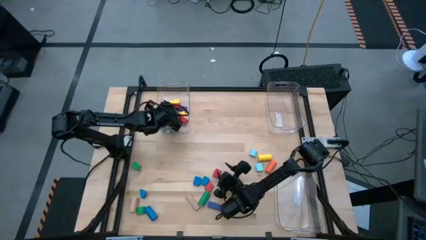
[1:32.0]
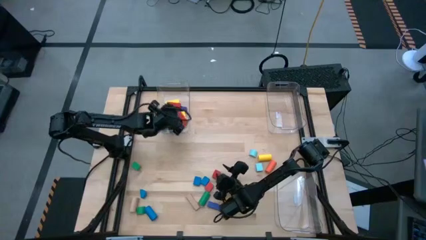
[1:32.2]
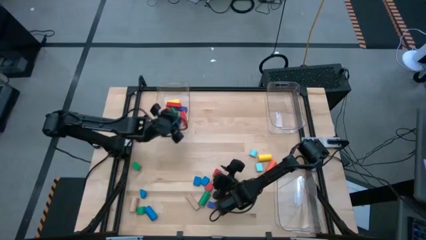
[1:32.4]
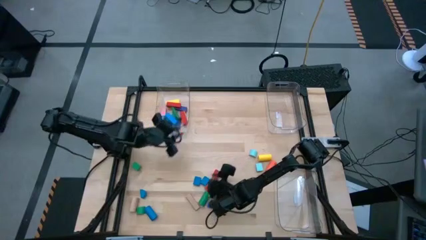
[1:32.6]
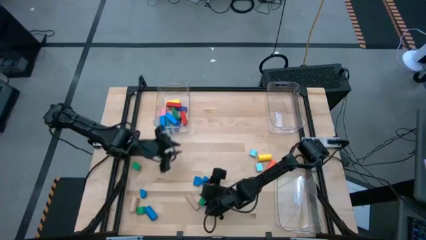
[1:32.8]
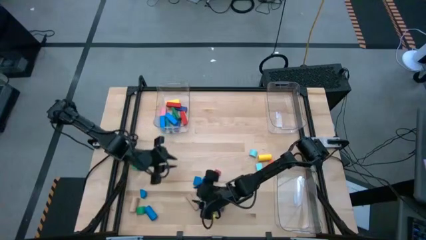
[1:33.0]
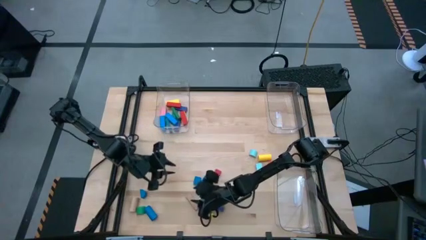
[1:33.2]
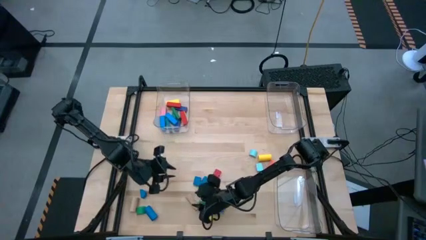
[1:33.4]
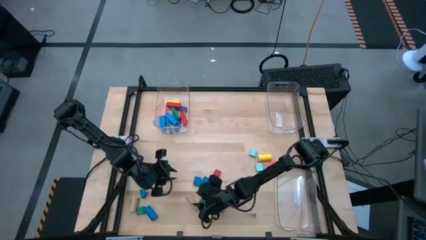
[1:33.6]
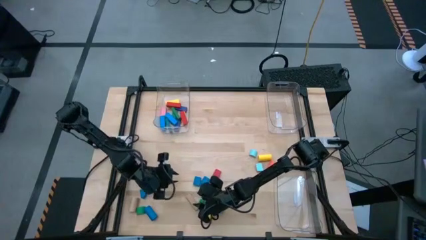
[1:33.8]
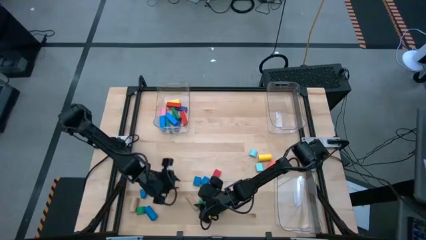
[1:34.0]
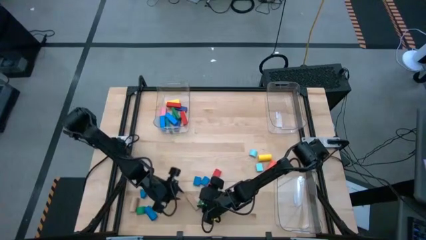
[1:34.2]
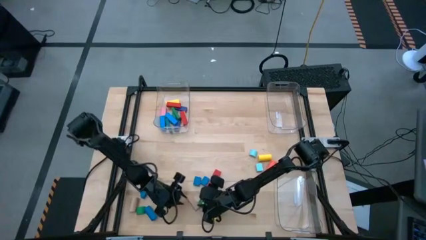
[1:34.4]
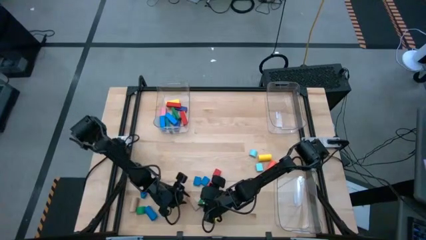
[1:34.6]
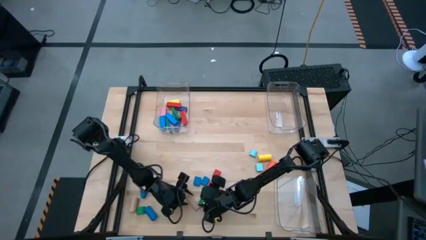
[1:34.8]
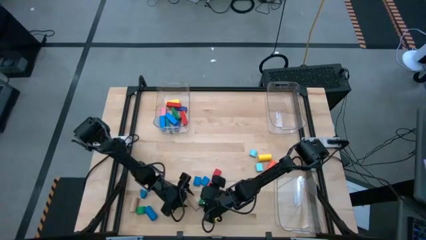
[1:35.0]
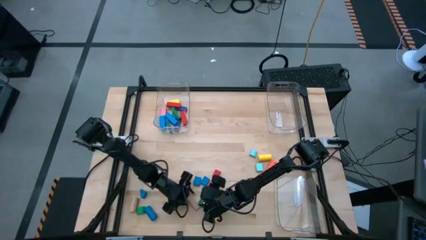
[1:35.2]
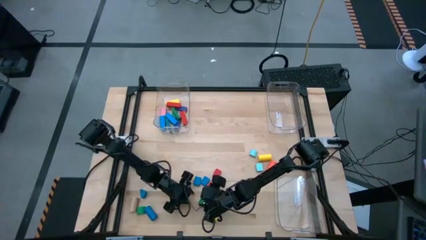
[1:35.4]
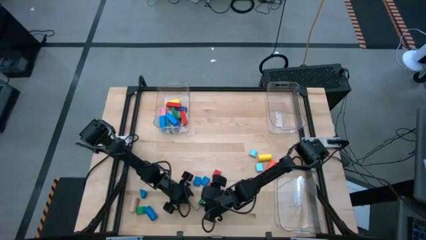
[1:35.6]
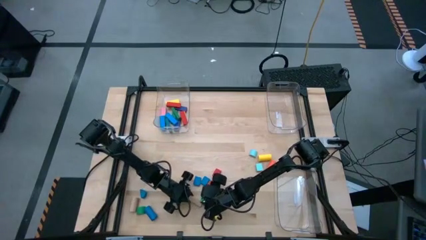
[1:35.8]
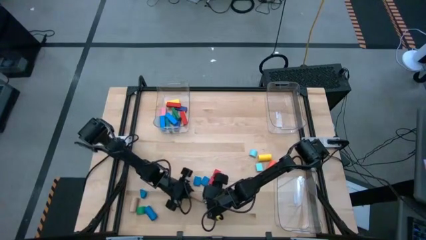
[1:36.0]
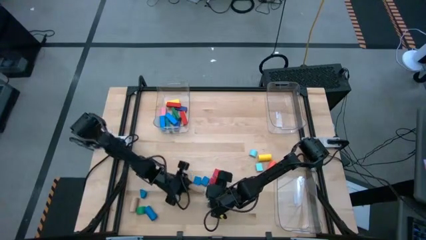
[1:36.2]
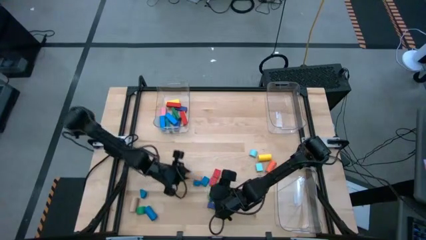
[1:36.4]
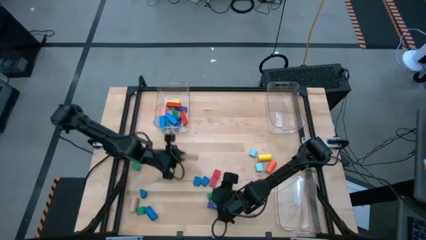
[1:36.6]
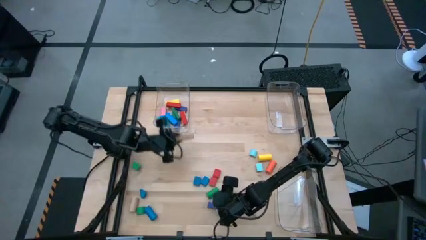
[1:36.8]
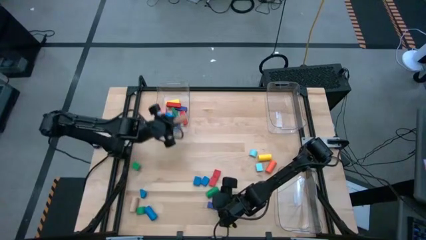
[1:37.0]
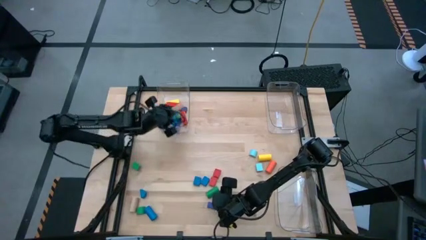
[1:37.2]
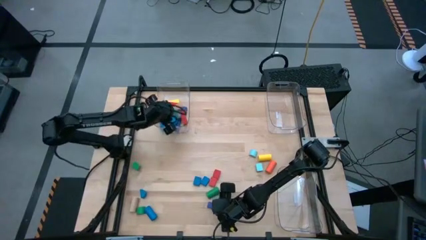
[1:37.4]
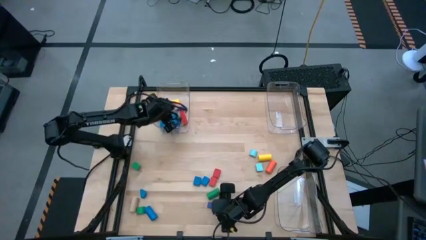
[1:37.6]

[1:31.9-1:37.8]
Task: Sort blocks by size
Put the brown rectangle block into the top left transparent bin

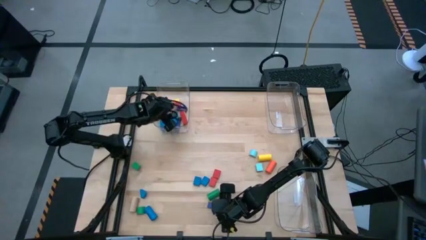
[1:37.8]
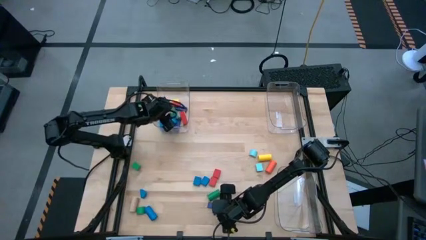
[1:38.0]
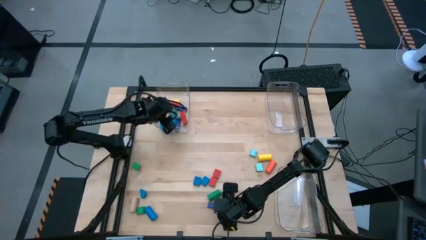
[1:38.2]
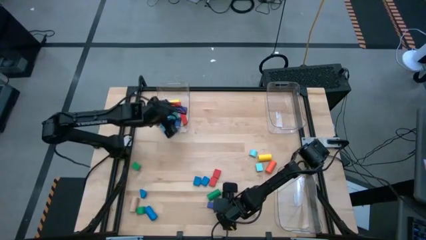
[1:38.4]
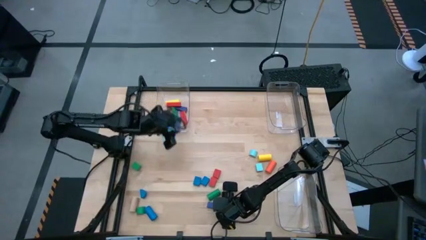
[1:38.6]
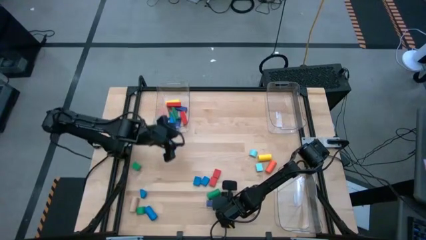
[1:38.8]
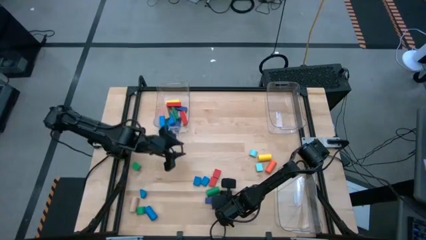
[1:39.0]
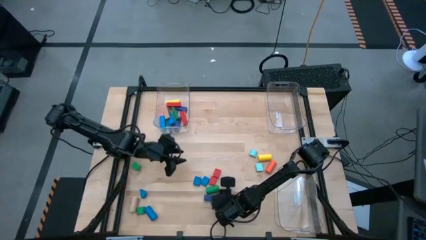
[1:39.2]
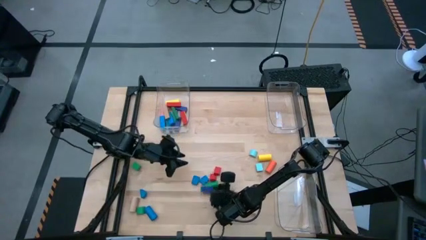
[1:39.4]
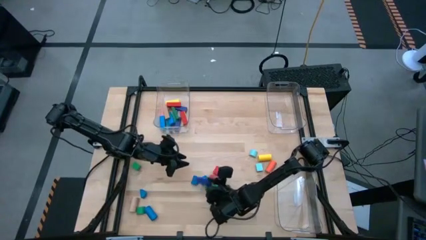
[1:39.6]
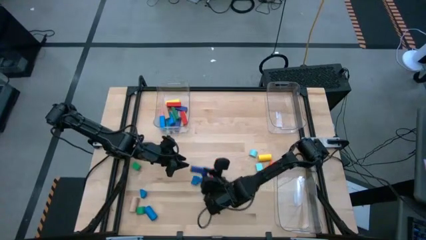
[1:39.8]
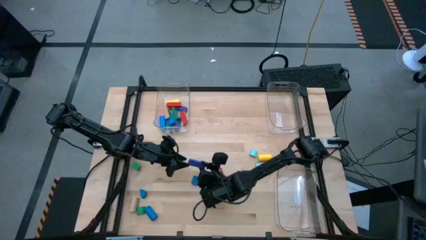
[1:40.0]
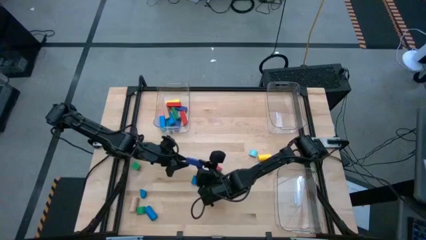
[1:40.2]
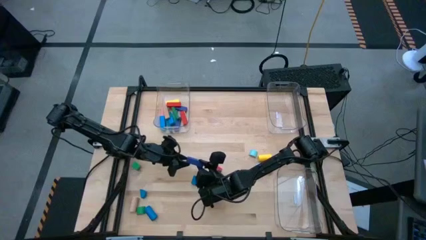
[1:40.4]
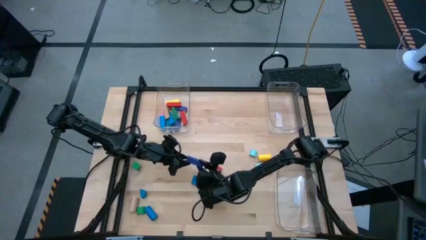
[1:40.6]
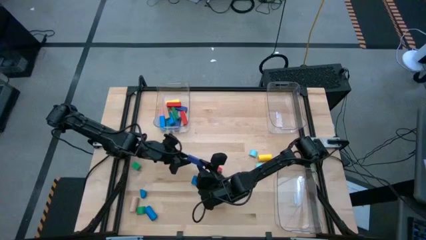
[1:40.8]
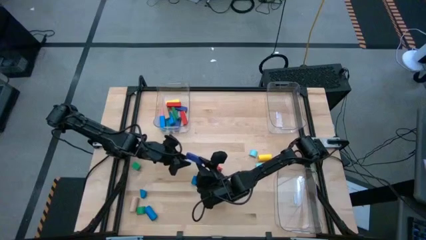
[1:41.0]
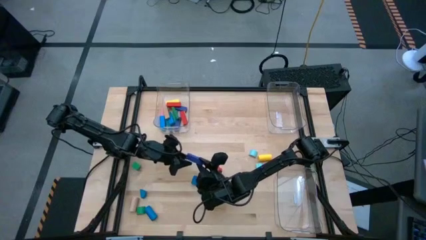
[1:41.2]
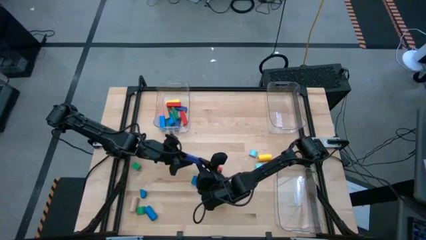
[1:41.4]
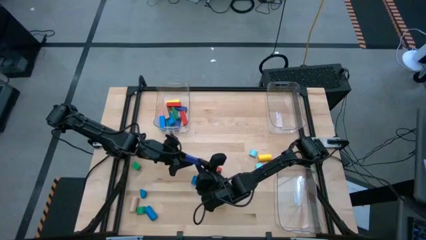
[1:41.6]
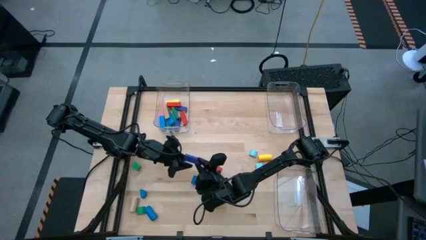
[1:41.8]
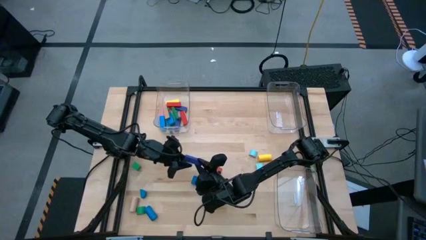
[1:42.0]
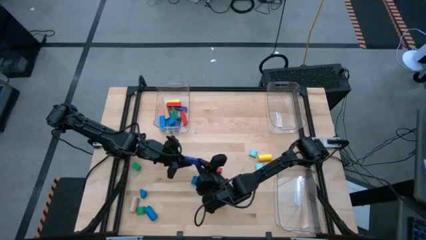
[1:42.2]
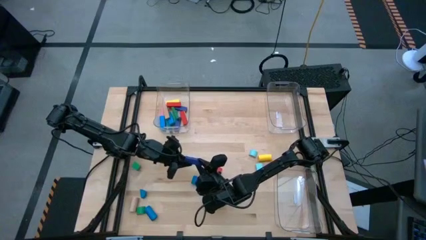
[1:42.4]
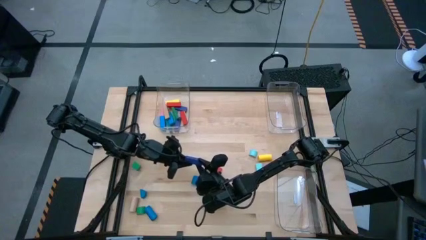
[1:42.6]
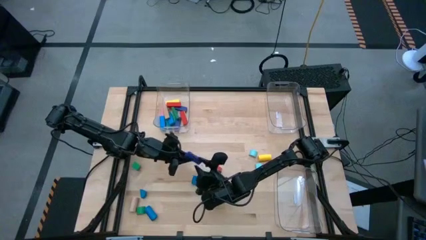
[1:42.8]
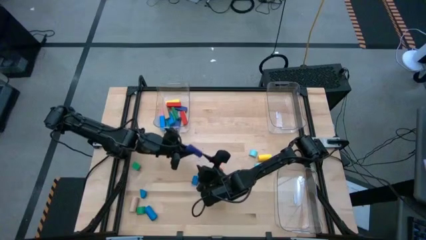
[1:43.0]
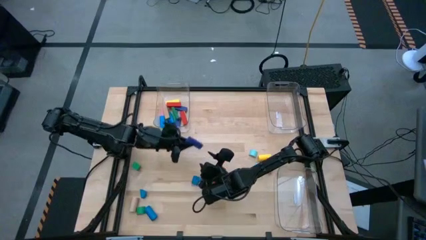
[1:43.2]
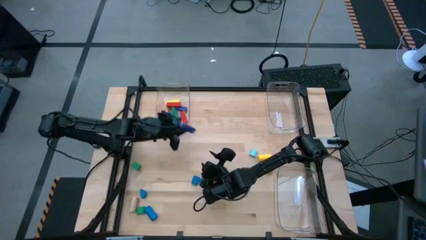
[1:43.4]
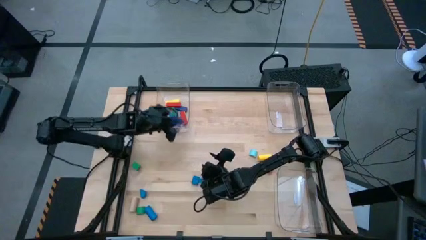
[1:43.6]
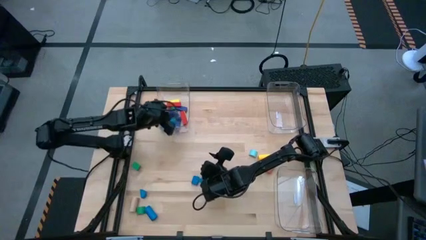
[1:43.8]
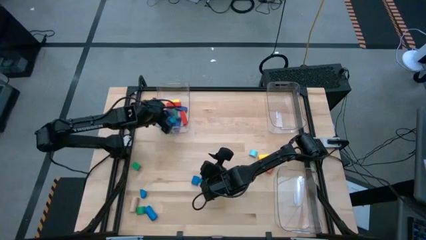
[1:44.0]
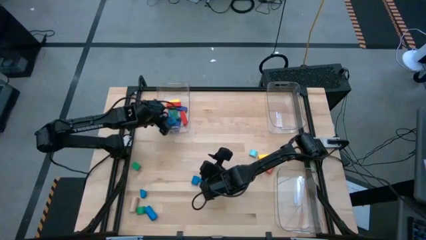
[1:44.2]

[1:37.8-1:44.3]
Put the blue rectangle block into the top left transparent bin
